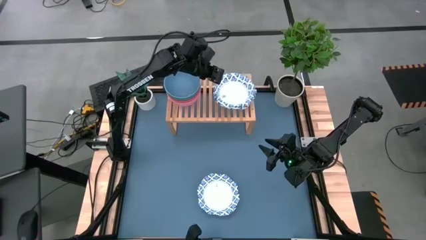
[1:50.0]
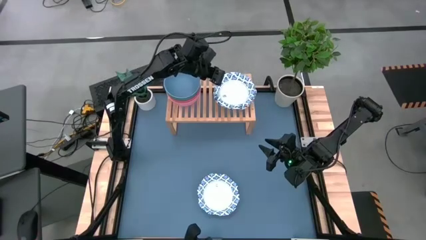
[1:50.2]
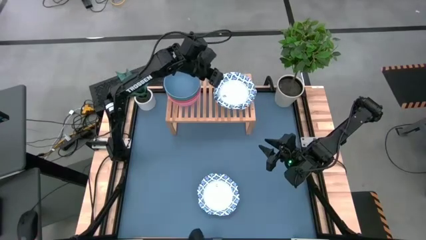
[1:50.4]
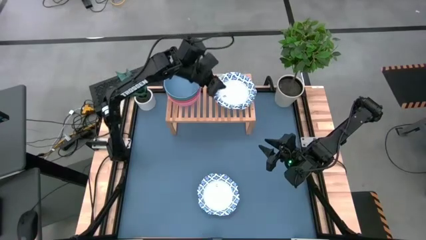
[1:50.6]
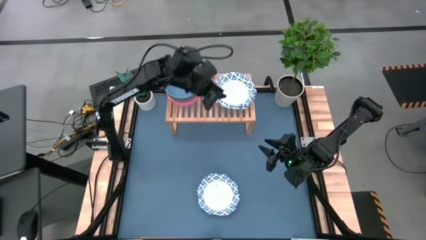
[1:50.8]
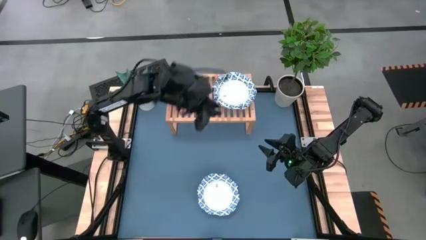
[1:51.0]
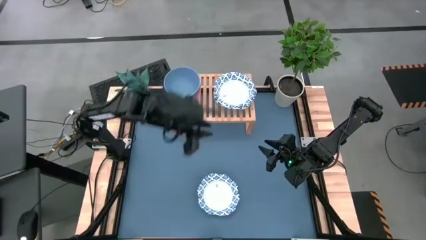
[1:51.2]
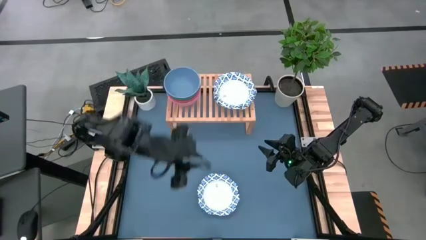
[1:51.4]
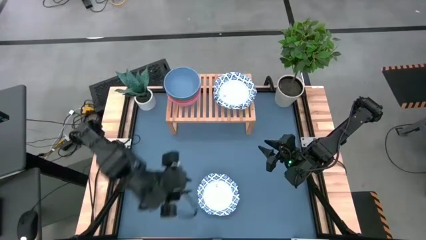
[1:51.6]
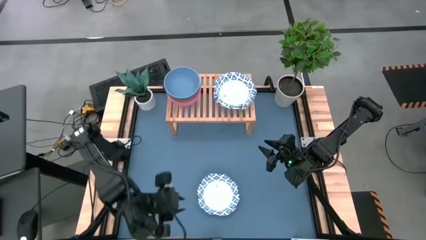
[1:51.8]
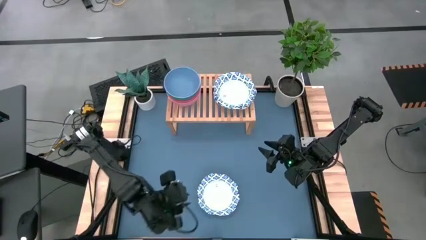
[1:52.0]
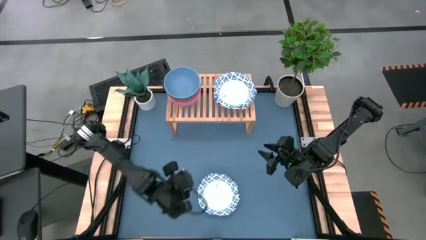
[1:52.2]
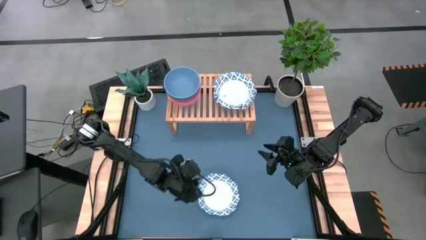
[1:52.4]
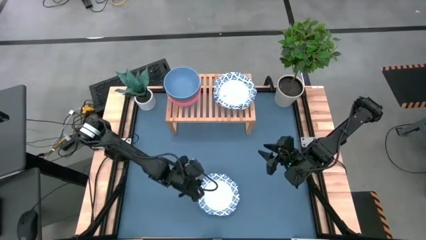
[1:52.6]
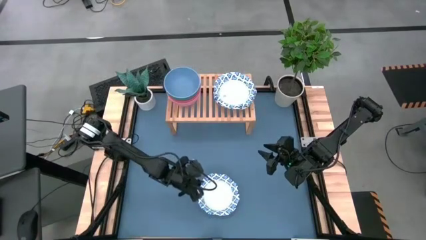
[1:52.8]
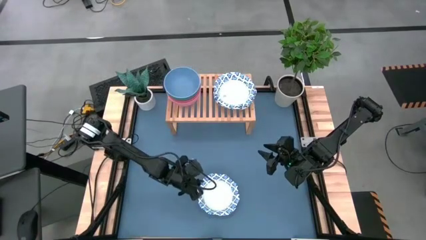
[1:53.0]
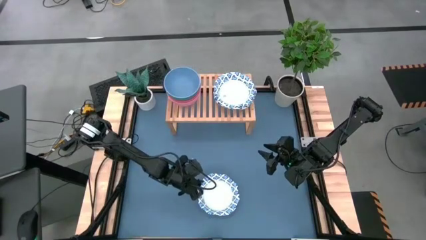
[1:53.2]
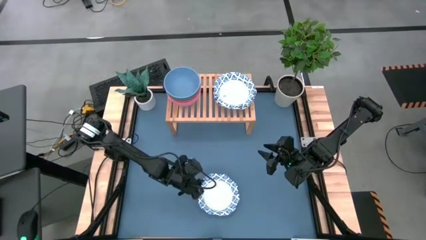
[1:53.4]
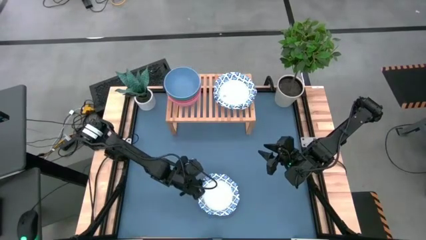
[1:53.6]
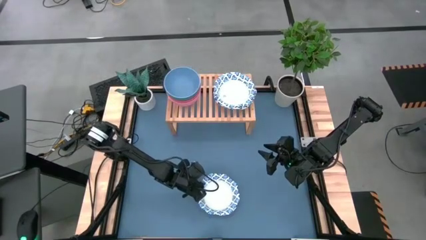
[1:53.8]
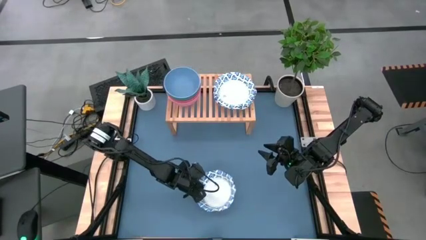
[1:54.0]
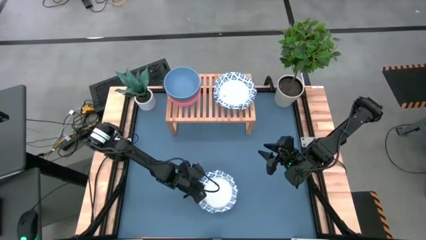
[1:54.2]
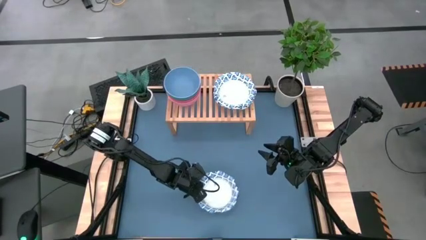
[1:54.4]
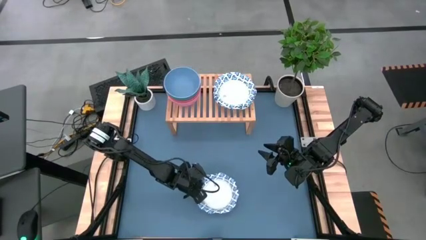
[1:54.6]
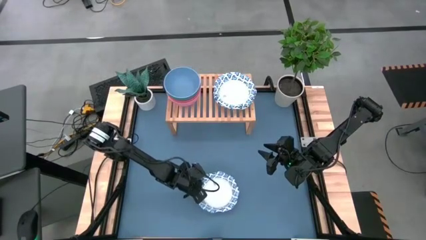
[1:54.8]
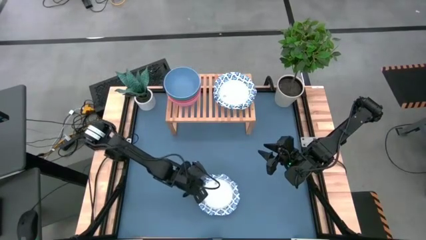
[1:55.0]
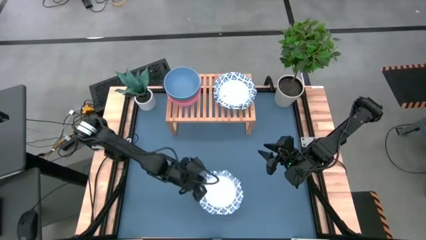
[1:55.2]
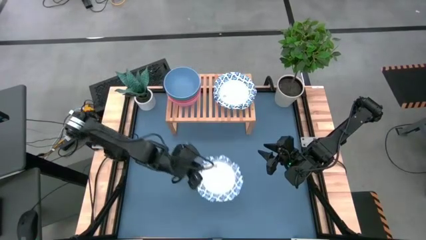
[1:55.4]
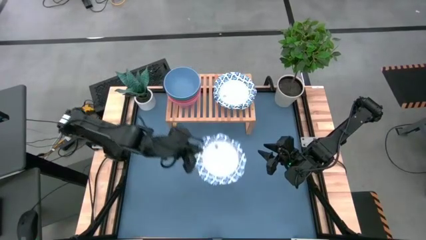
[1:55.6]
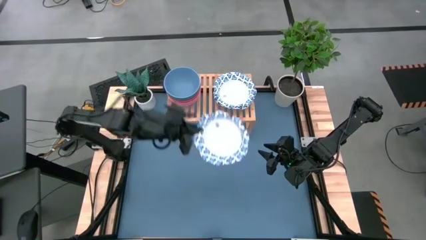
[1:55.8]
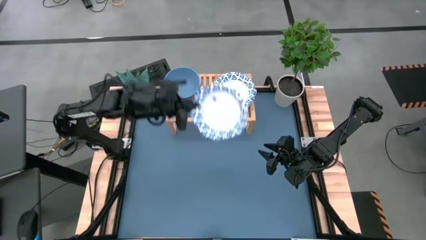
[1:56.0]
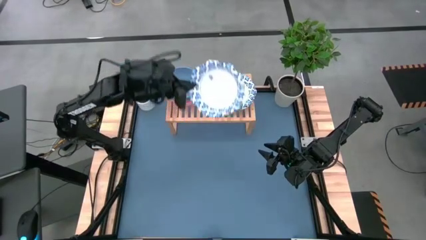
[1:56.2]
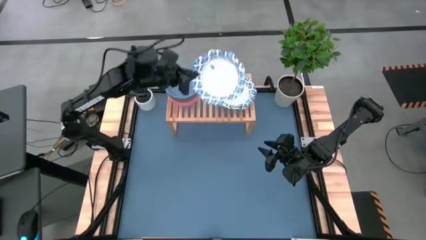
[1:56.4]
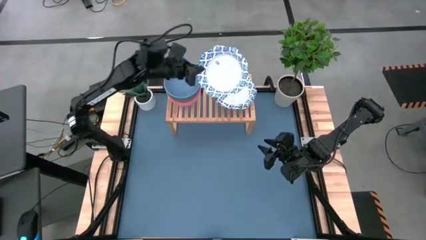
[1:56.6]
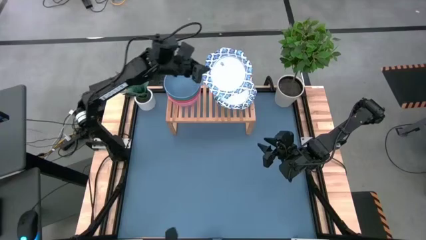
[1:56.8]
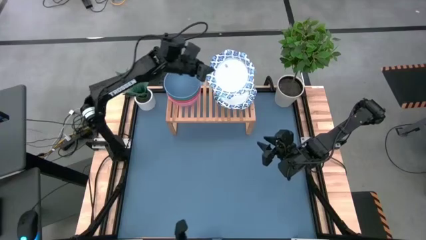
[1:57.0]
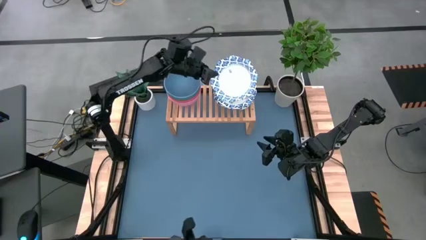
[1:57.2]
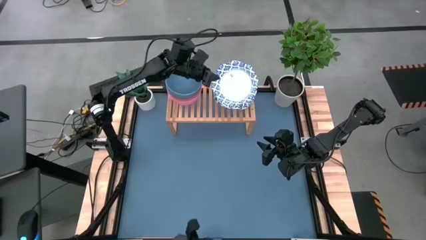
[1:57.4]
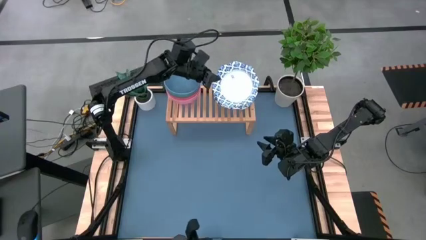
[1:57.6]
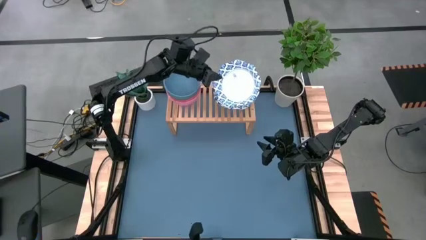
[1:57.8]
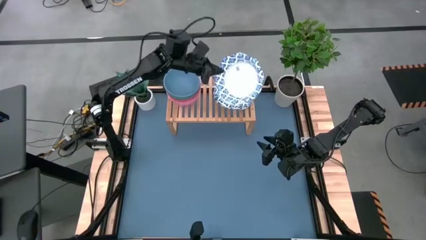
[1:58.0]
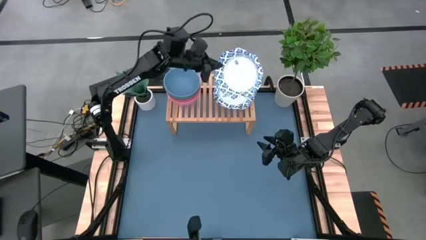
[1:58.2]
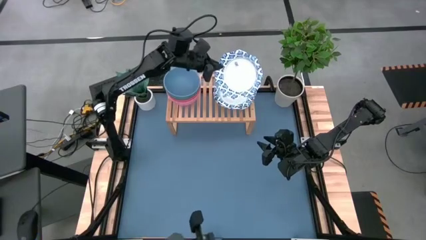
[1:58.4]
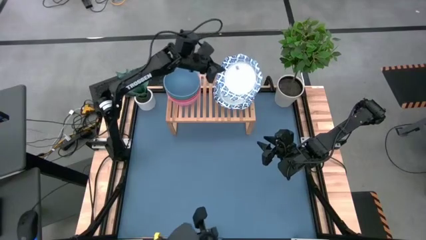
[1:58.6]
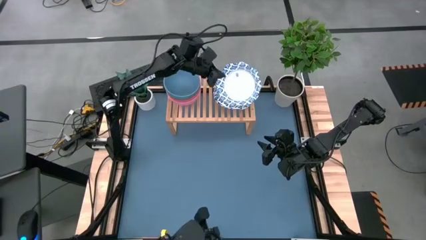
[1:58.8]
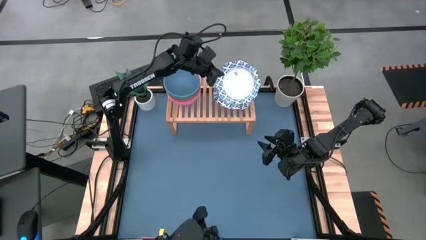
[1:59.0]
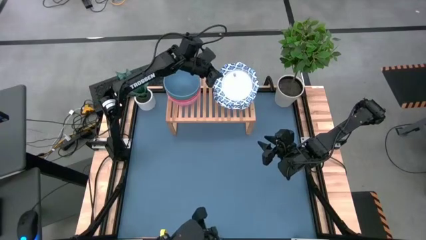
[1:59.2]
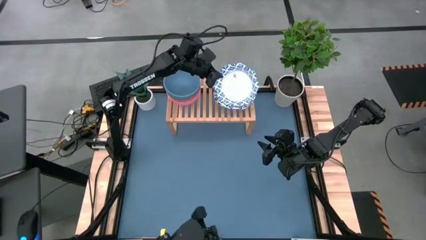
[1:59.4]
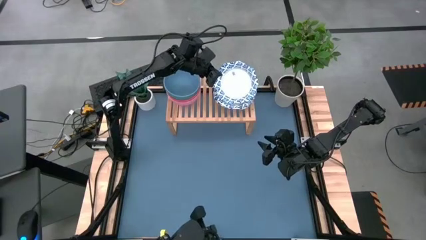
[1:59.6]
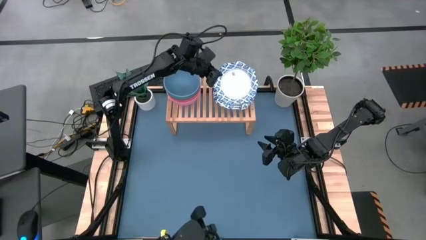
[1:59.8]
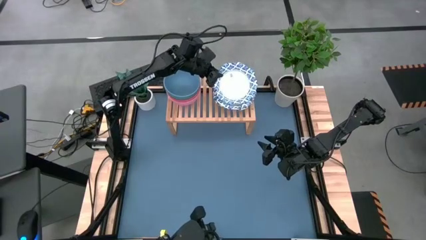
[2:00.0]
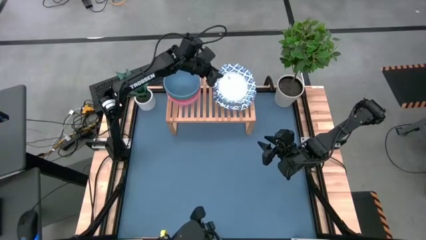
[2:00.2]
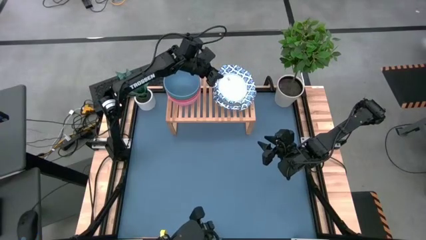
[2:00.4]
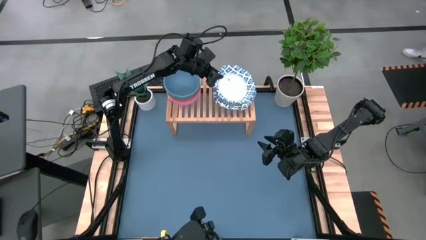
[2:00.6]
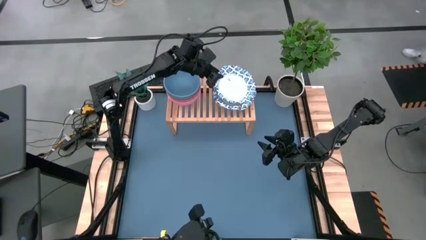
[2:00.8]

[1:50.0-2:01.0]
Task: Place and stack bowls onto a shelf
Stack the white patterned bowl on top of the other white patterned bowls on the shelf
